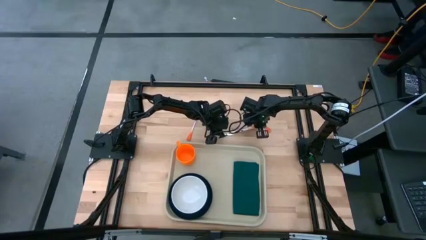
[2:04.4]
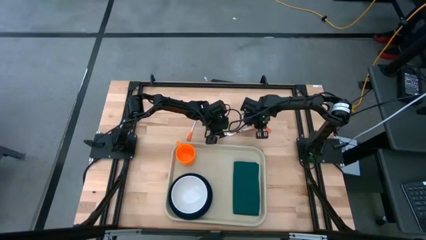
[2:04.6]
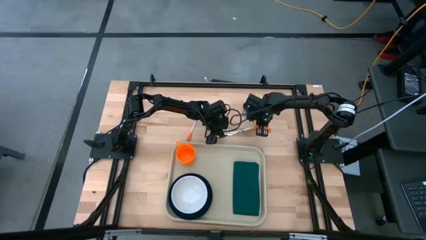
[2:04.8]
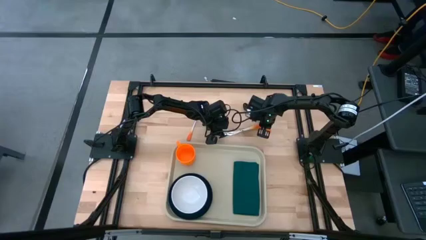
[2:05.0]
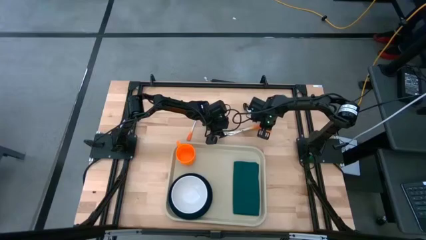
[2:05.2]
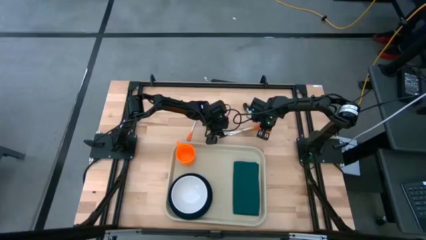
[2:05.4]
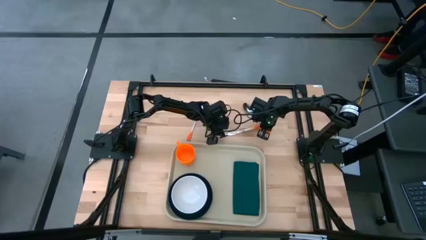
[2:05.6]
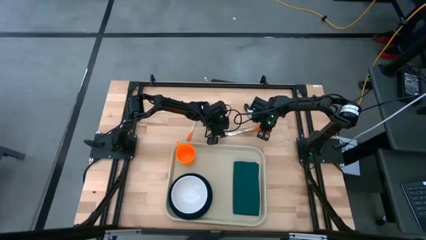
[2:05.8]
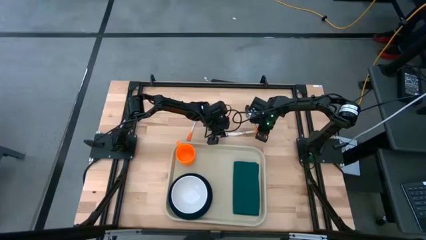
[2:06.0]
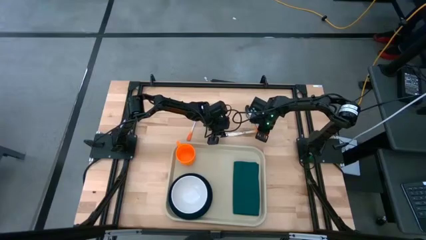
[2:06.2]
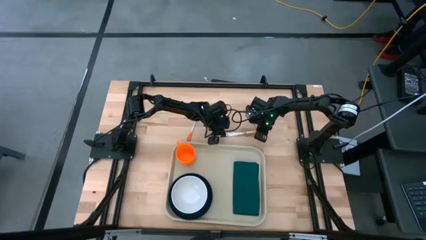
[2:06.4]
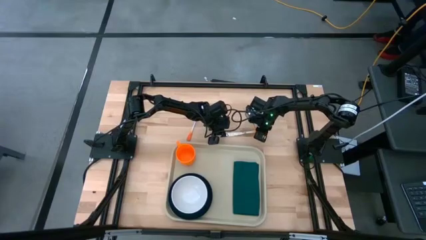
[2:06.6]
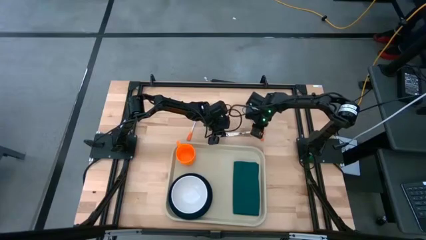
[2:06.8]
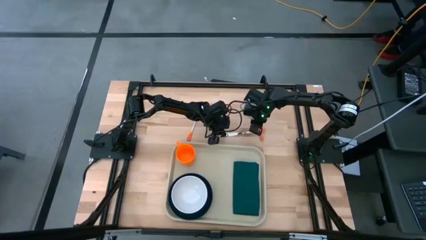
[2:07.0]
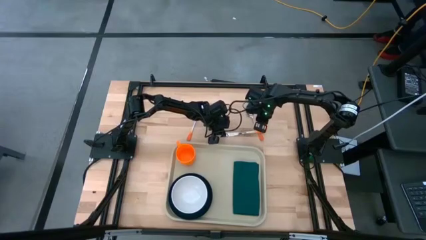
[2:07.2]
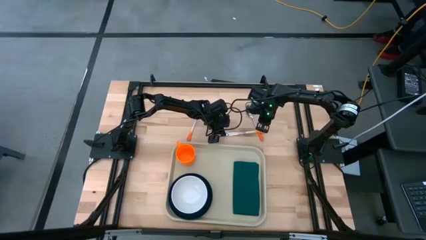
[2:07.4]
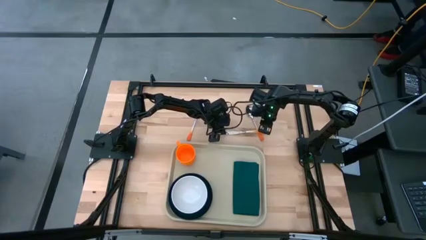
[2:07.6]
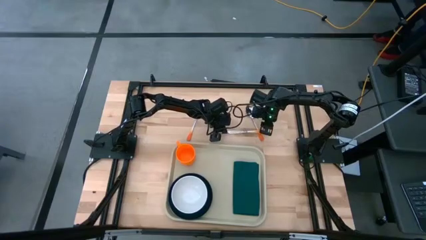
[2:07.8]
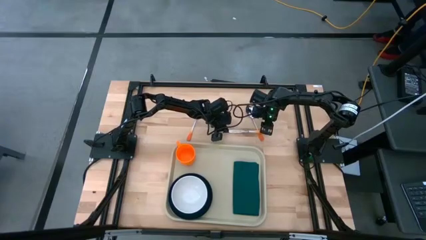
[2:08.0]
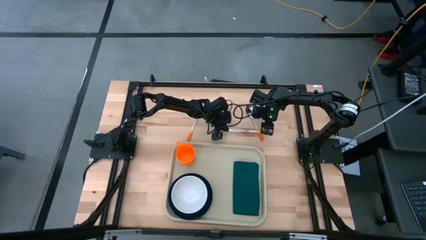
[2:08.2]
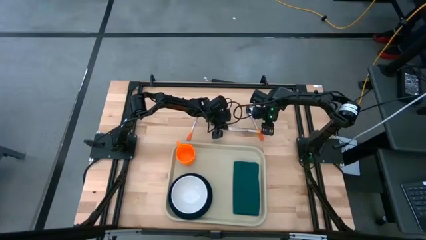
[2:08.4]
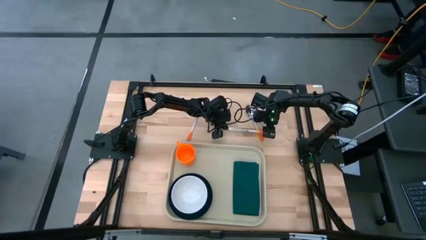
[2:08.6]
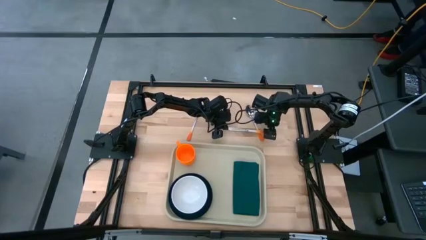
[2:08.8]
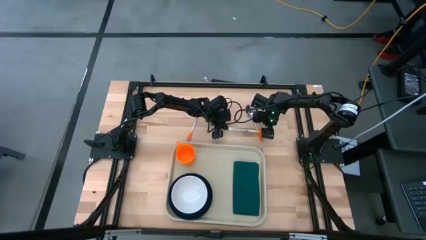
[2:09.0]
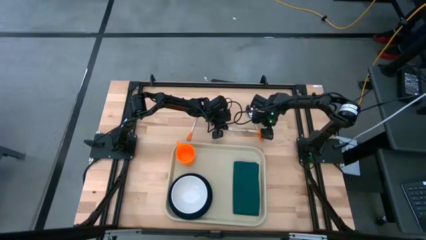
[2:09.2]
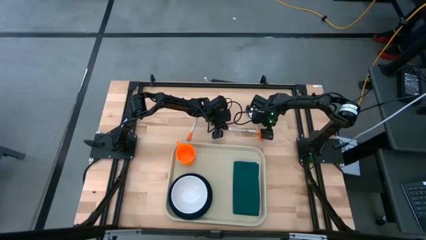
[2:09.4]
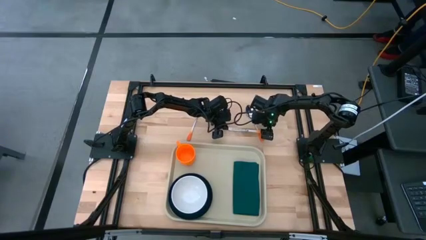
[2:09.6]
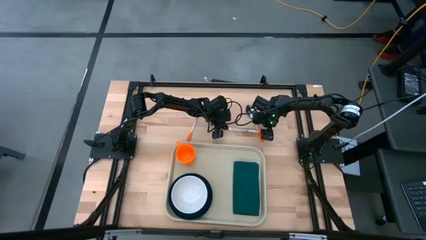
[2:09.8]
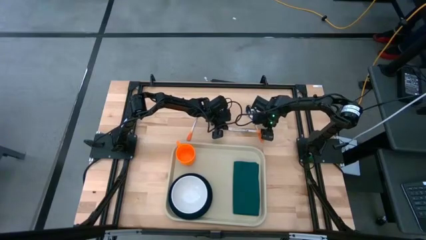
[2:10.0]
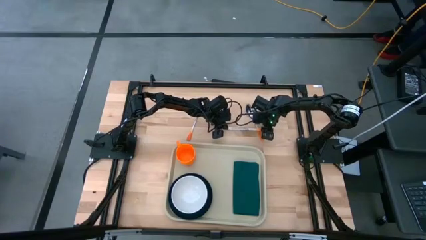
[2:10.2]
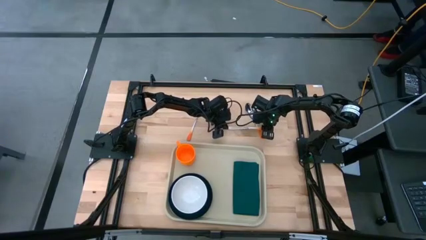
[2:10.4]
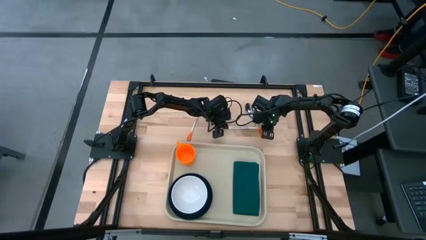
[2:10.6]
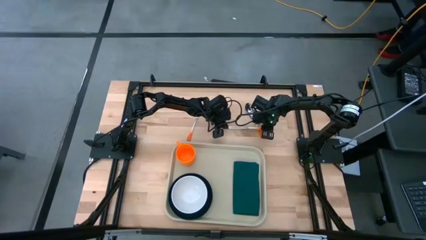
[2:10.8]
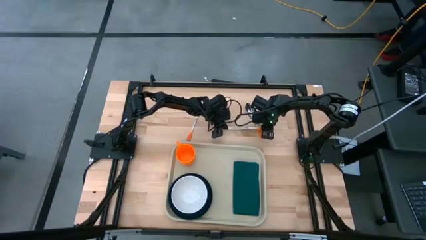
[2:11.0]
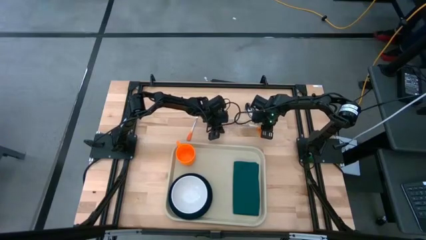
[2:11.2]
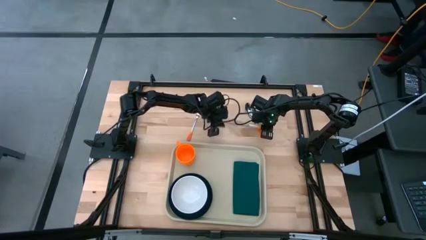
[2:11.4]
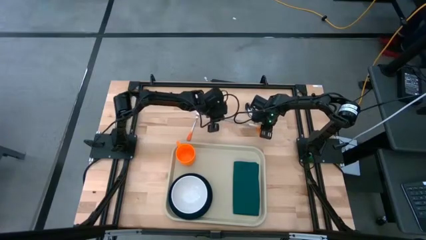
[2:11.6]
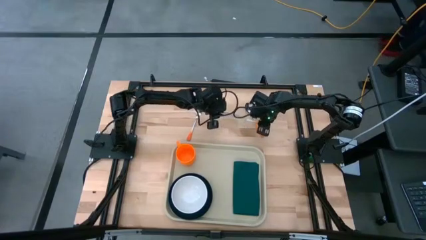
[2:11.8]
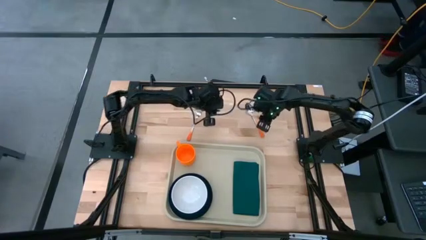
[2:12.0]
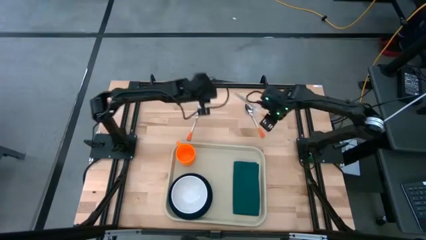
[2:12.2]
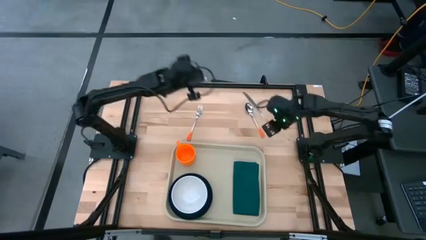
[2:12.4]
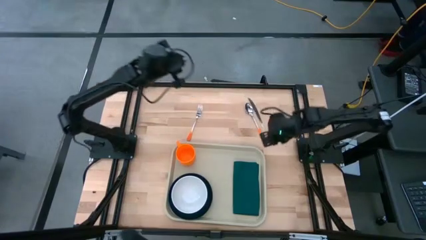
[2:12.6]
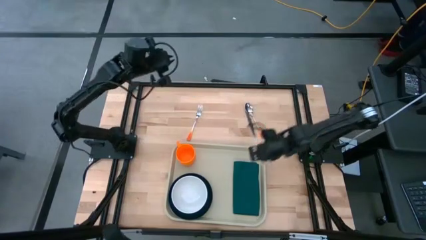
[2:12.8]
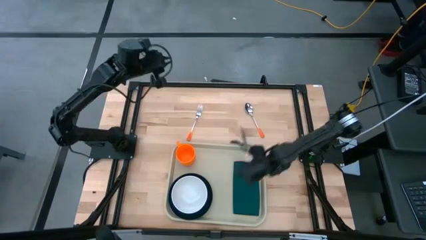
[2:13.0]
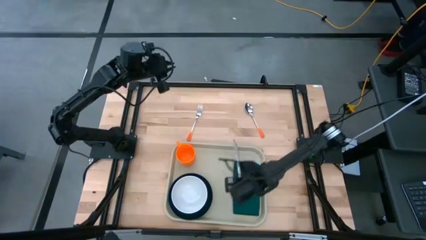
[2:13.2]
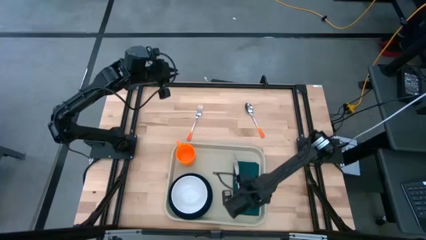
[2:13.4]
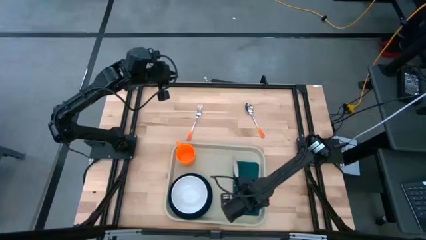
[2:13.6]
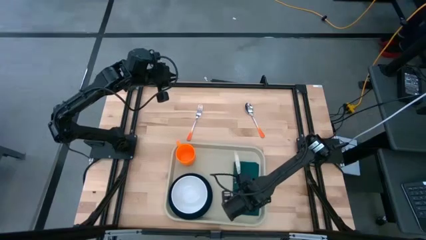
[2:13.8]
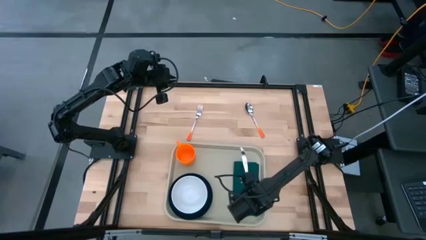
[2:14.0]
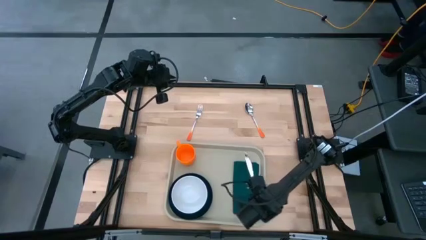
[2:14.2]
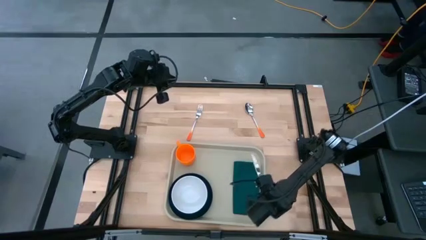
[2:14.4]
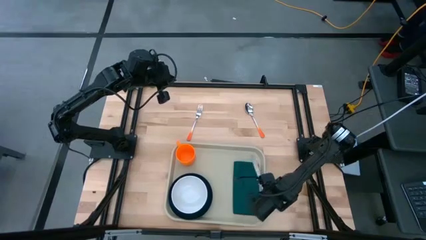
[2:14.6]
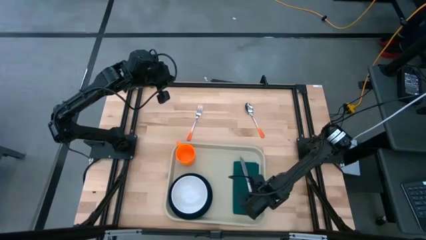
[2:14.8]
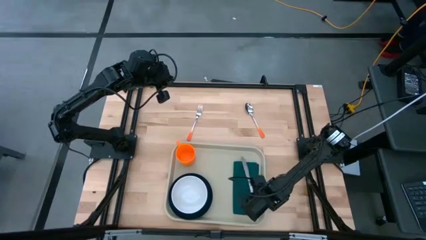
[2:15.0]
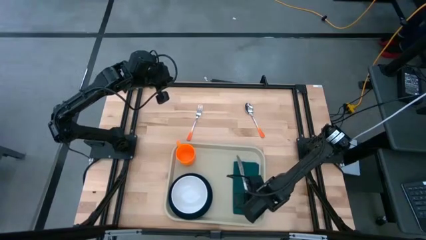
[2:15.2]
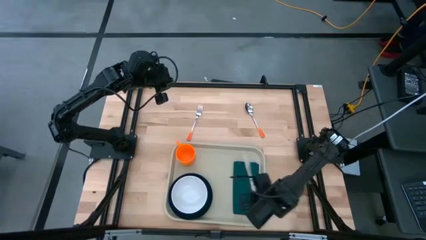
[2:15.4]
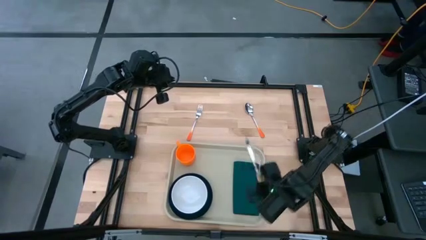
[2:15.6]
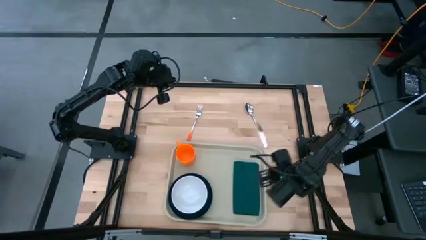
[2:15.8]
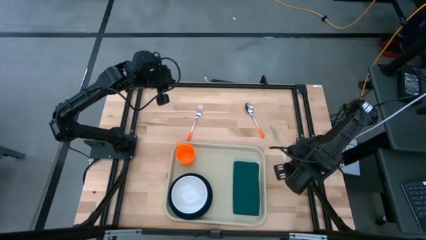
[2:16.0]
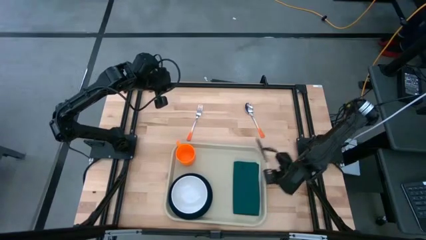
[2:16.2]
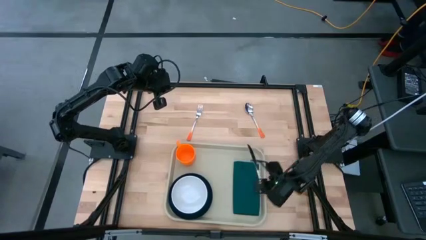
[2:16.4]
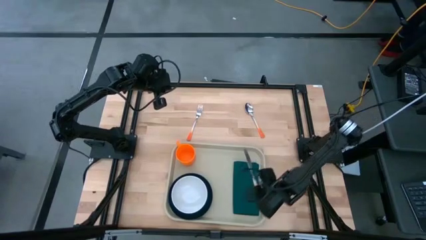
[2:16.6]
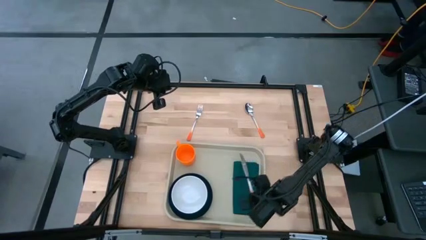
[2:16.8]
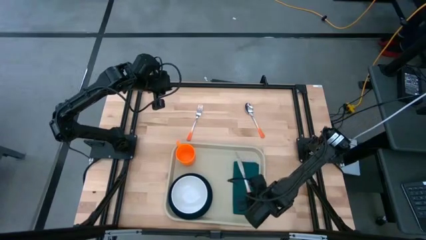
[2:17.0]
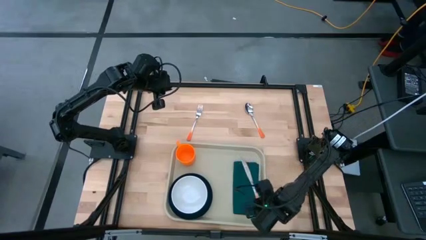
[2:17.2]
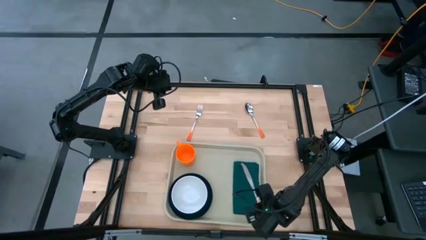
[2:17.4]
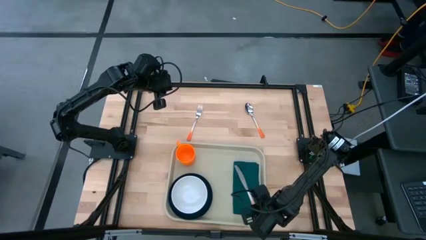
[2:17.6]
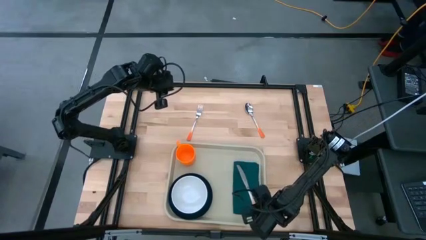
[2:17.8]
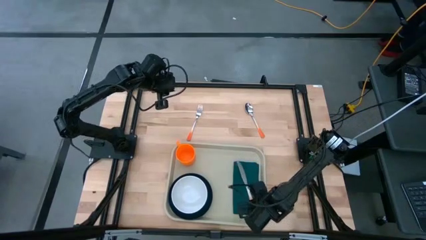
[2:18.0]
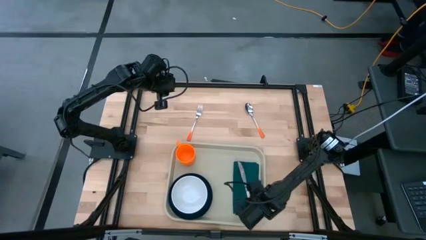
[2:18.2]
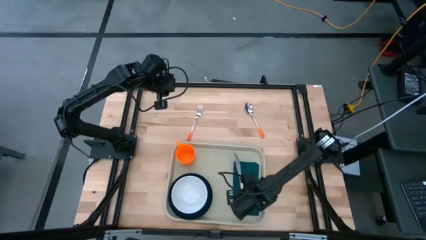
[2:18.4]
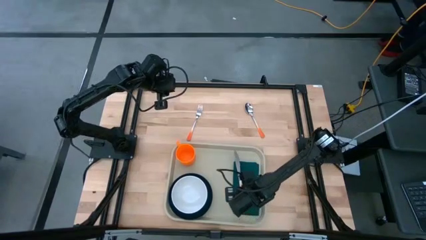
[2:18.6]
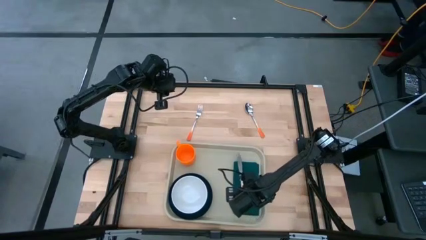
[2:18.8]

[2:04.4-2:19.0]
Task: Set up tray
Put the knife on the napkin
